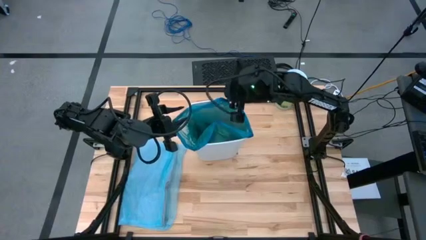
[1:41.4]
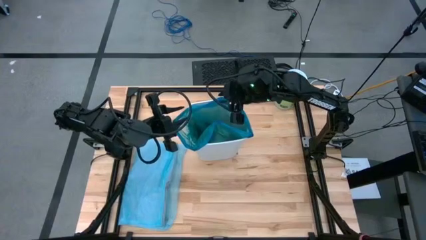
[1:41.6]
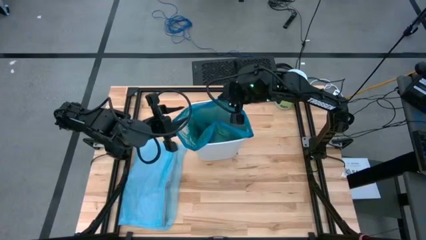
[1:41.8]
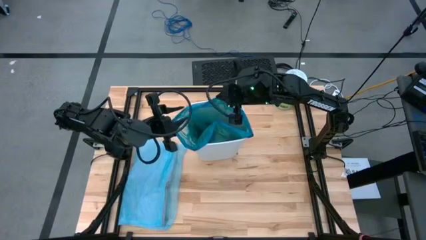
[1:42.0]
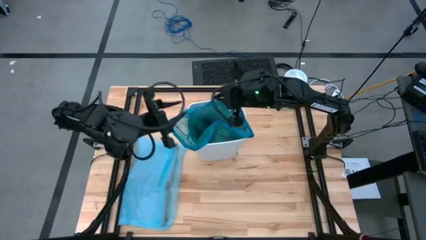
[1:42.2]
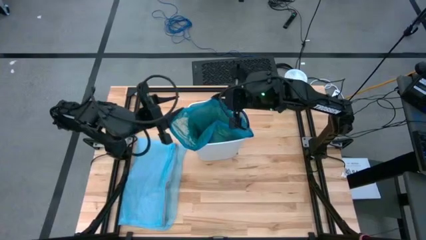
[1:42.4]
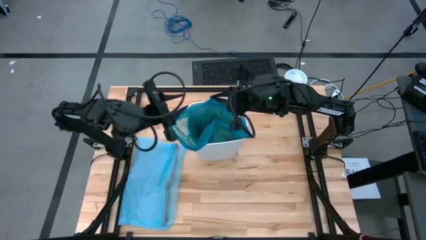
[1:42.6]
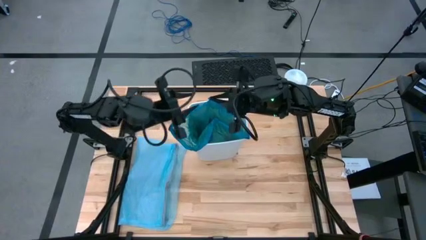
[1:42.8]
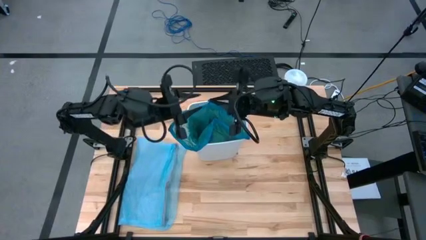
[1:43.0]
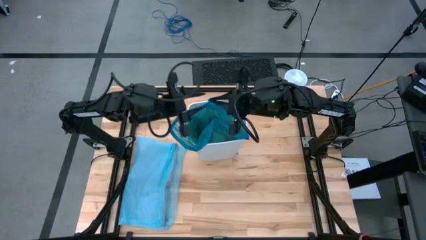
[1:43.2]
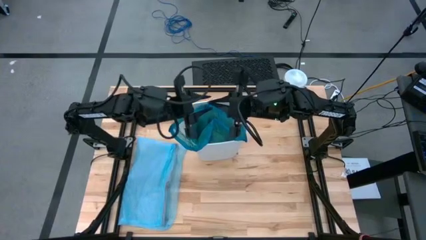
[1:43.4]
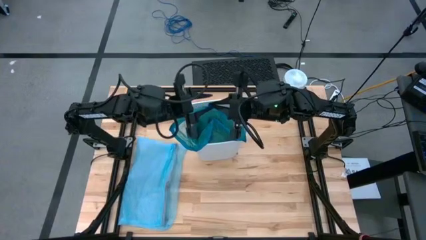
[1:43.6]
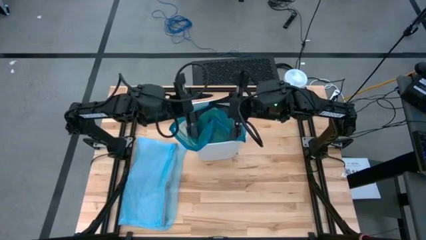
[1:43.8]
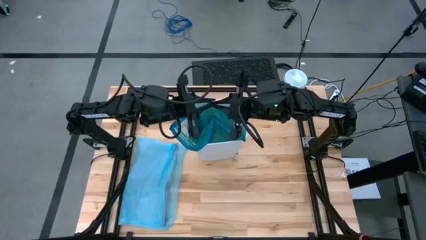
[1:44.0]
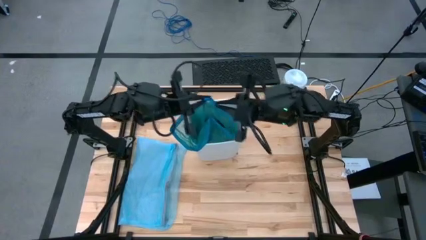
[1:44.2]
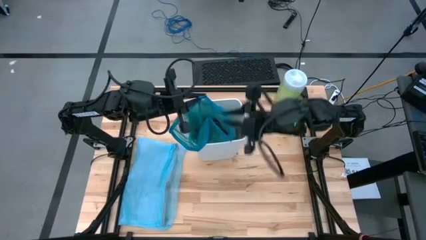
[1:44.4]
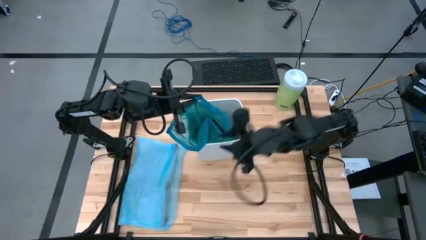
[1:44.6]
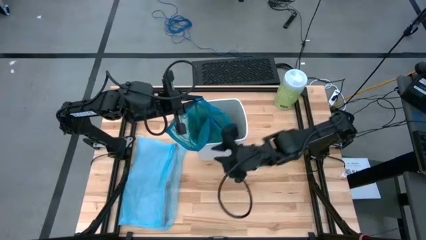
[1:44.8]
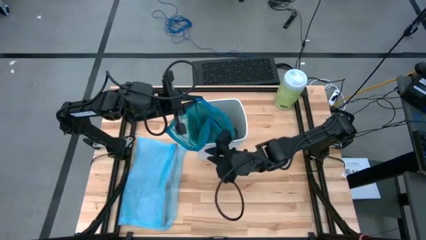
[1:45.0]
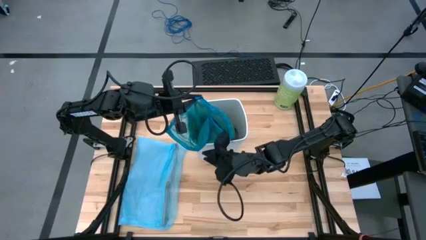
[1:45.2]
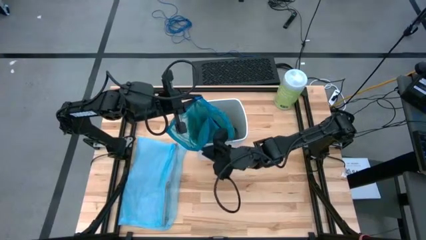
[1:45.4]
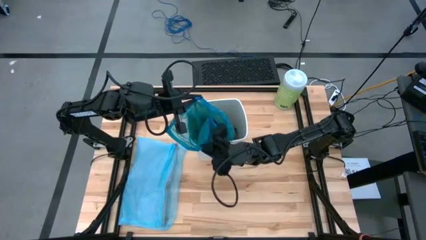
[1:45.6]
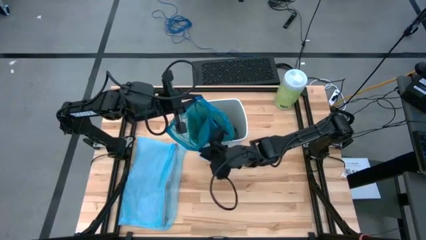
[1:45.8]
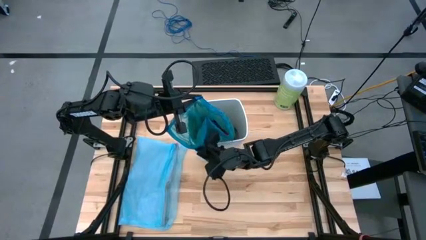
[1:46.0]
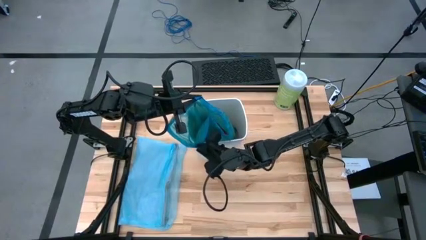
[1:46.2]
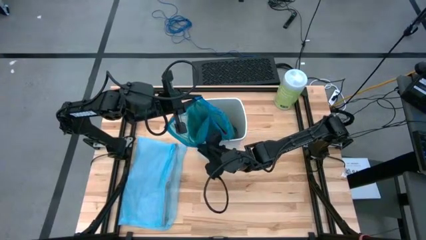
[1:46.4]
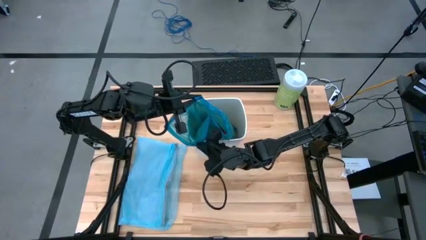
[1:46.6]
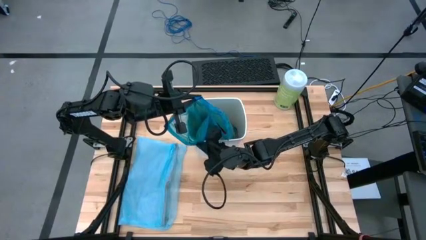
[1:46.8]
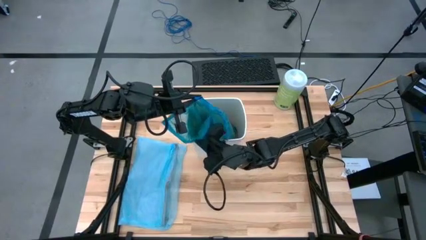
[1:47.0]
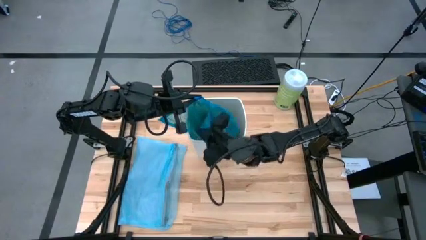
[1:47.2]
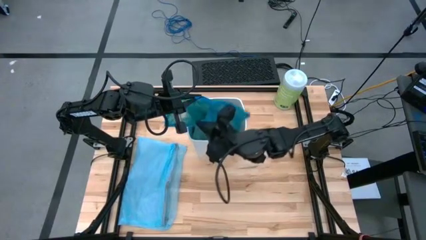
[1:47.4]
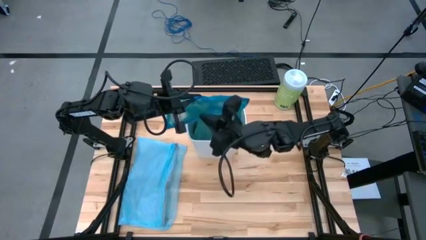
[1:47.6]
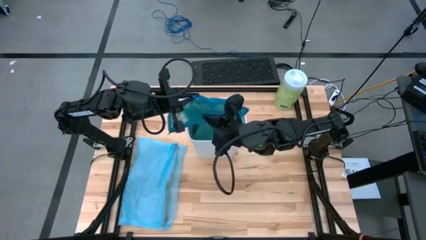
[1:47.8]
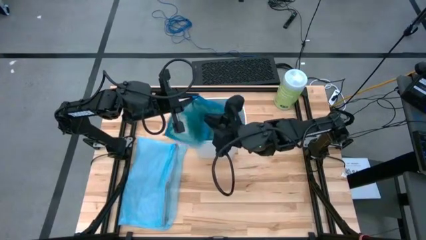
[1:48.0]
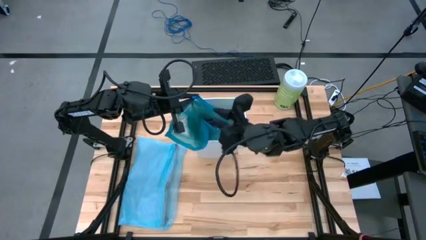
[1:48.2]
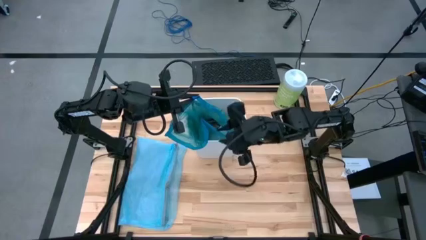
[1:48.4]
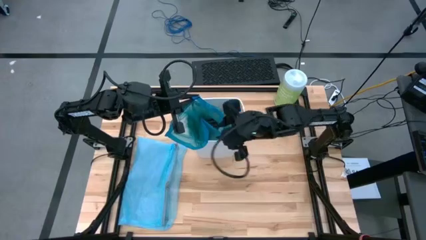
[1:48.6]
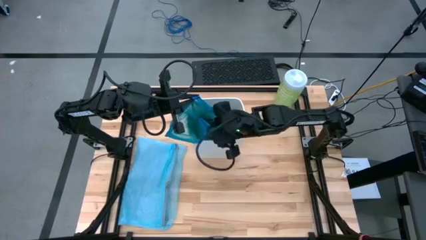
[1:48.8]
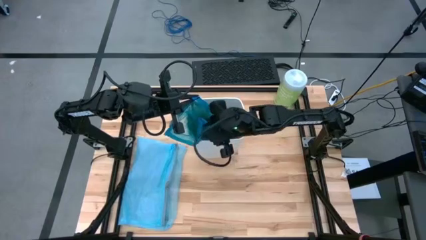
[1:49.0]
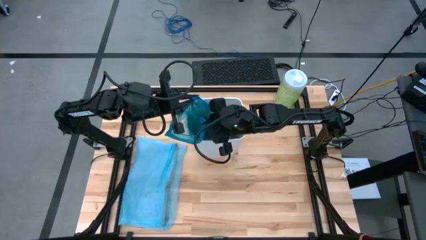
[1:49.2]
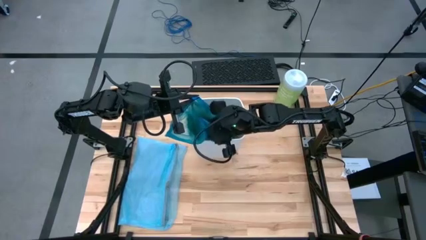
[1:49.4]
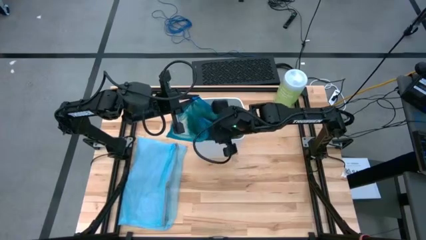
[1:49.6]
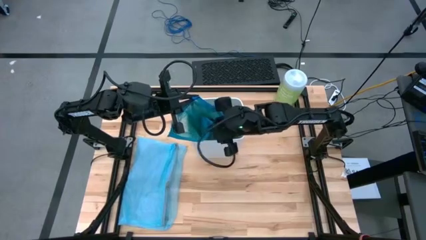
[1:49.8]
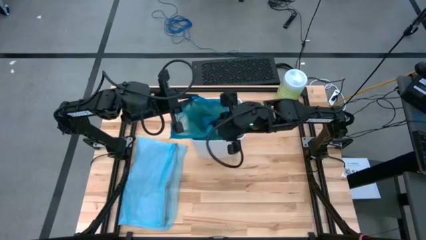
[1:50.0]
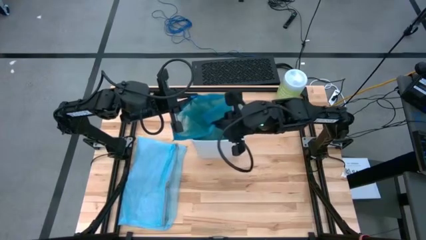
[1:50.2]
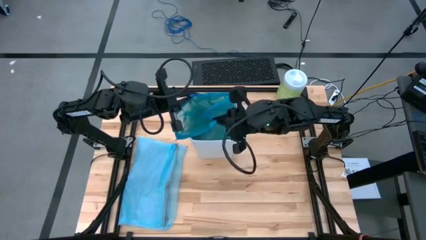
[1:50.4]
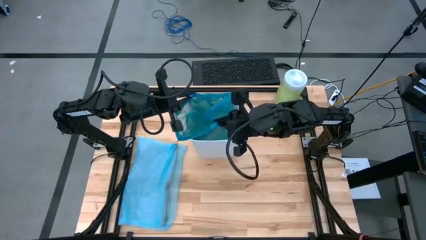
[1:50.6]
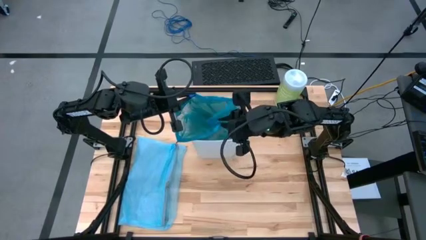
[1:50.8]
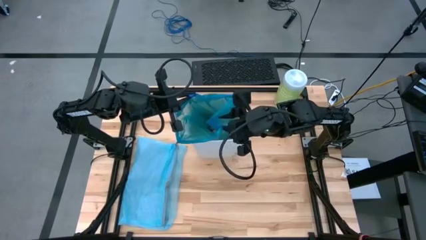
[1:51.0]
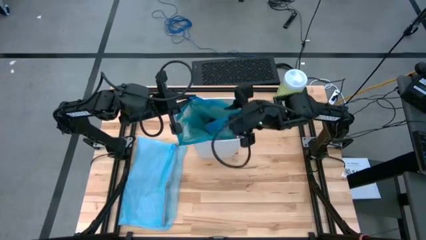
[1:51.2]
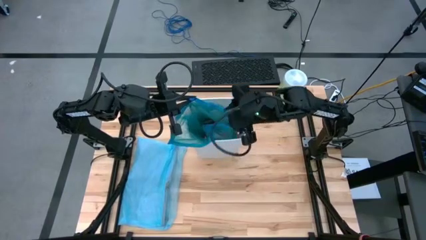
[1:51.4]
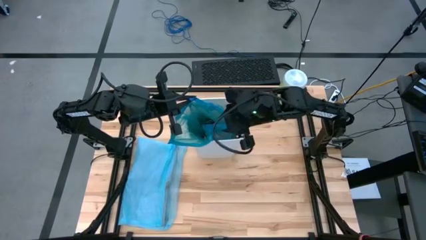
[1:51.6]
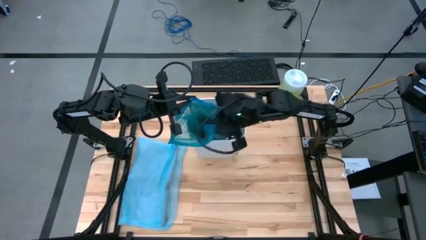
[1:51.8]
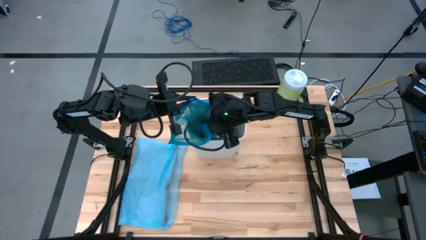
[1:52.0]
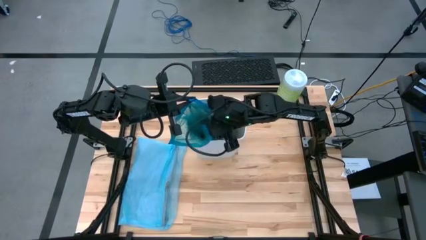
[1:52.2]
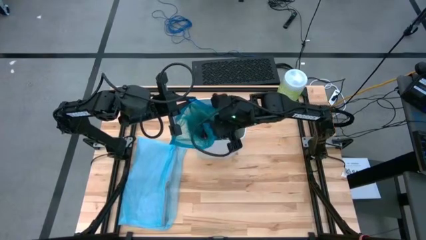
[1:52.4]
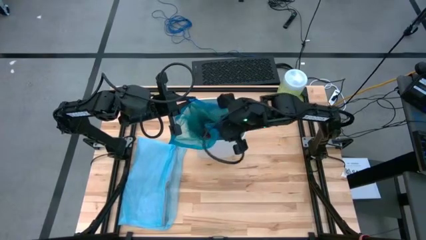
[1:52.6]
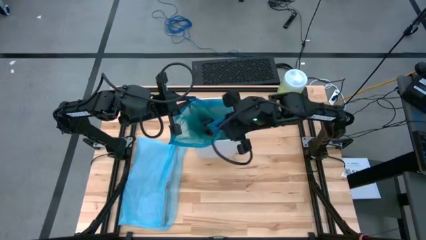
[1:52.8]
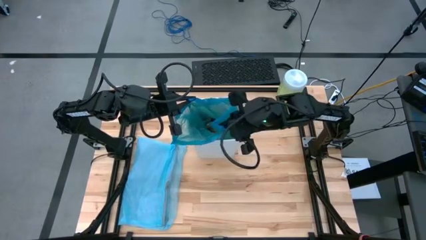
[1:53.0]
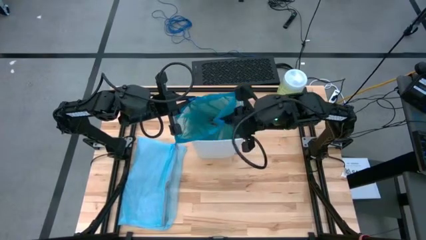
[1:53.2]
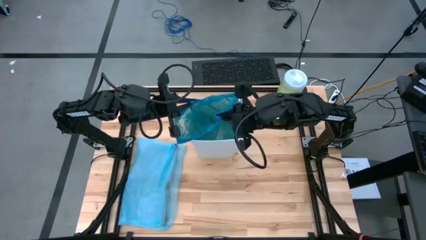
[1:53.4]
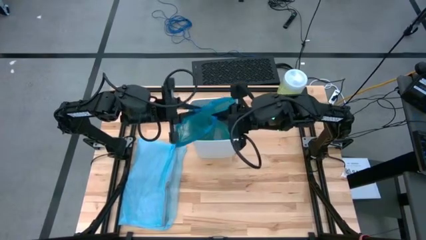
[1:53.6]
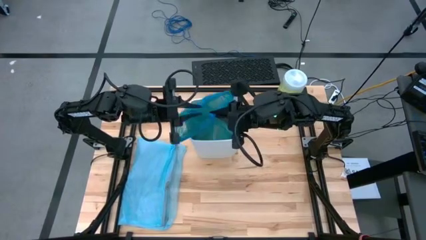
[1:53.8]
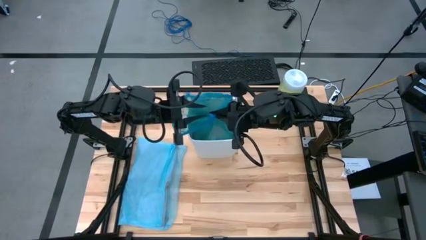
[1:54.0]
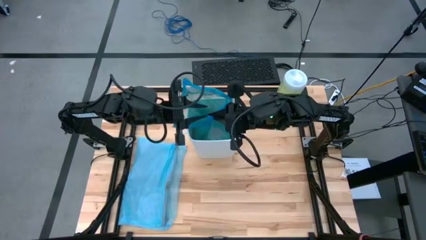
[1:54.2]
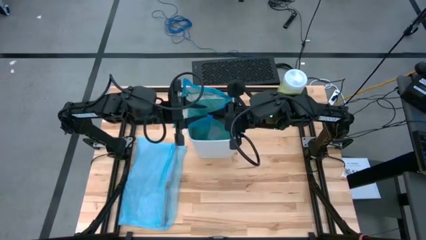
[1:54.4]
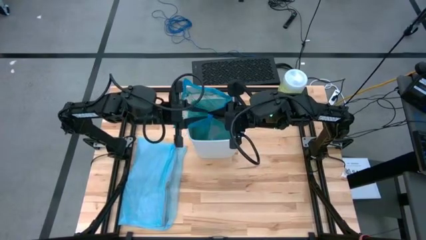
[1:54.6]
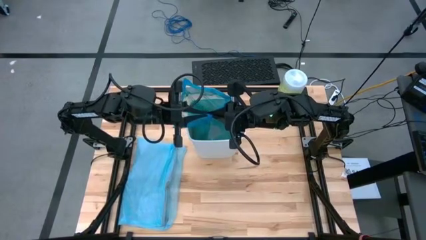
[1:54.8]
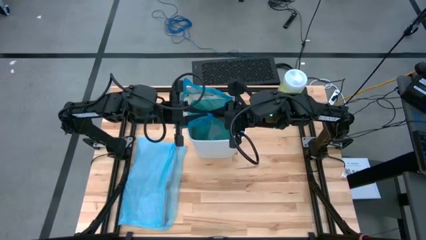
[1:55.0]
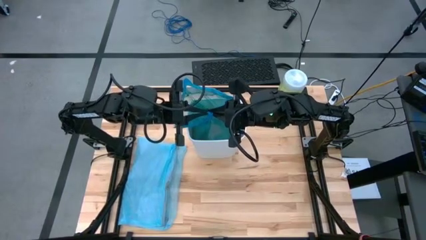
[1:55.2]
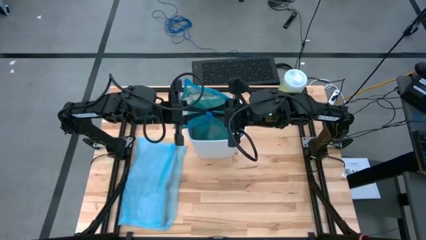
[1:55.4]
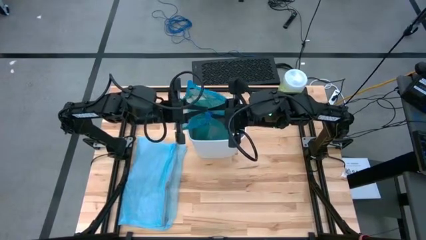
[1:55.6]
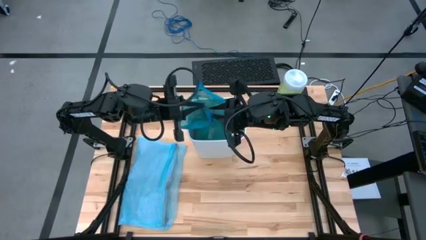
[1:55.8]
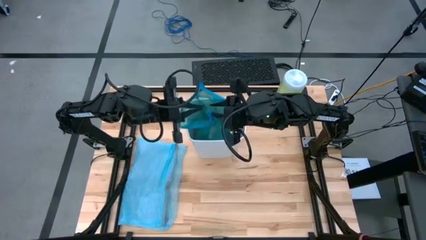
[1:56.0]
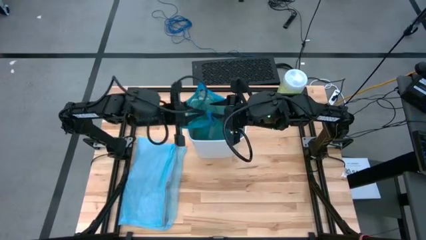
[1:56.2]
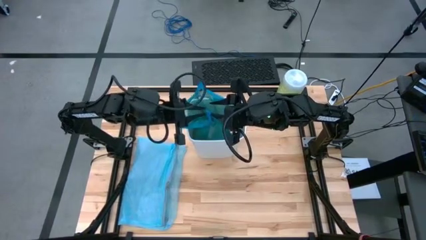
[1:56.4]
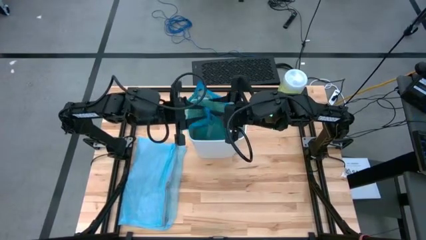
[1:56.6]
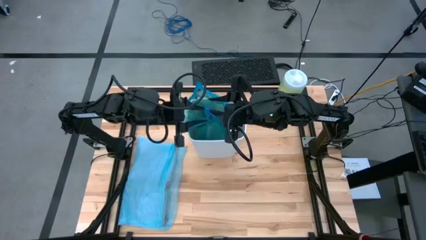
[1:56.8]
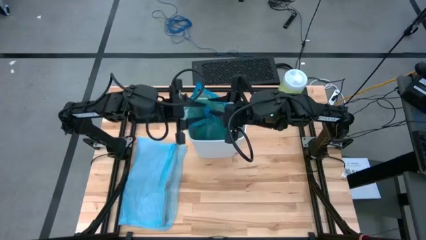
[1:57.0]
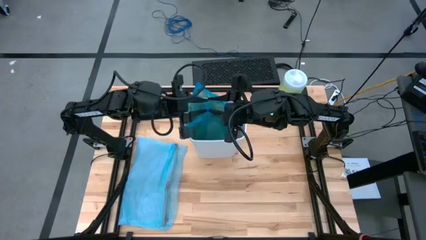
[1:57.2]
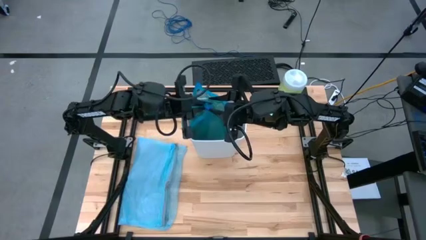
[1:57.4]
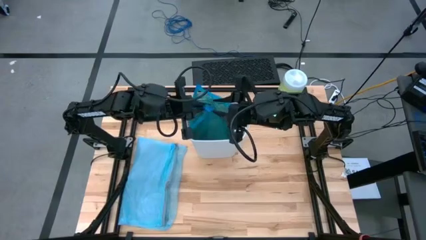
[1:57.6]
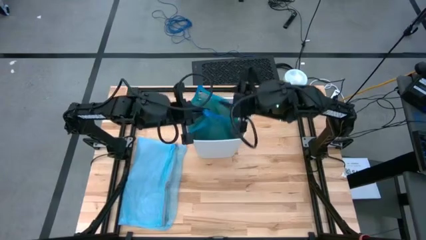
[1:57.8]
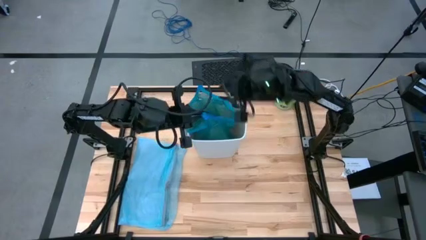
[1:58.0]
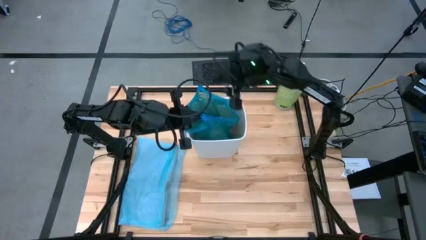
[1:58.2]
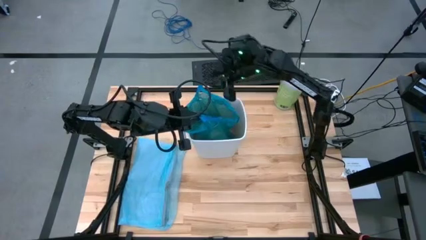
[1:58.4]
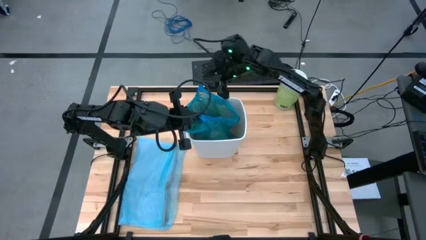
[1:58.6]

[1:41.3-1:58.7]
Task: place trash/remove bag and relplace
Remove the blue trash bag from the white trash bin

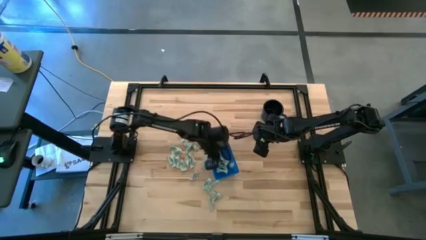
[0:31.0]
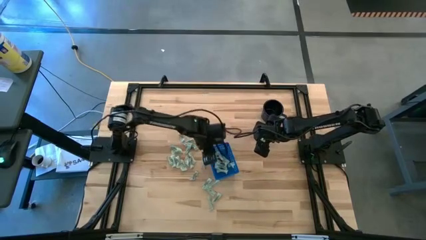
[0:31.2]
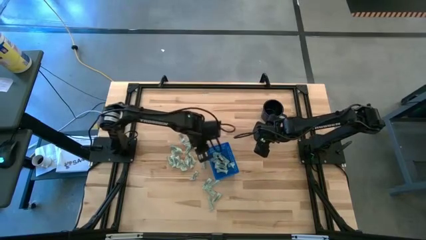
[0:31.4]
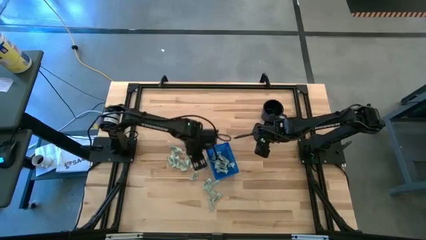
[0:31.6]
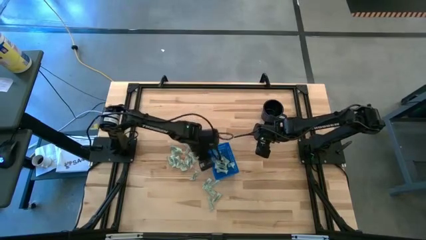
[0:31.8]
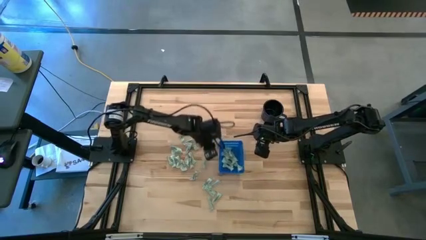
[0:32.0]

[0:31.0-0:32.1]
Task: Pick and place Stevia / Truvia into bins
Adjust the basket on the table
